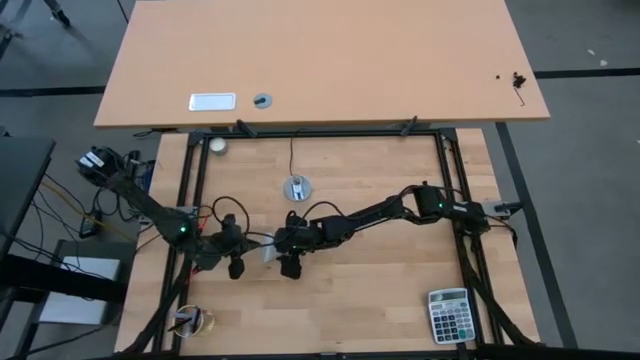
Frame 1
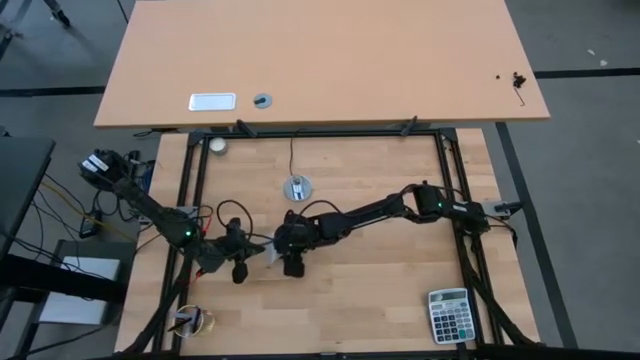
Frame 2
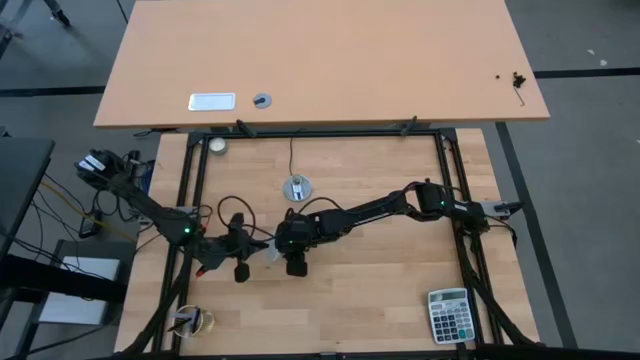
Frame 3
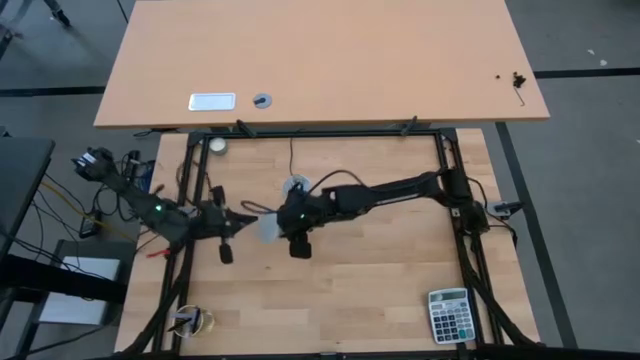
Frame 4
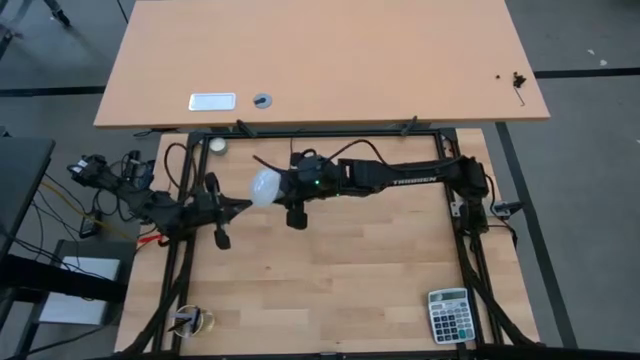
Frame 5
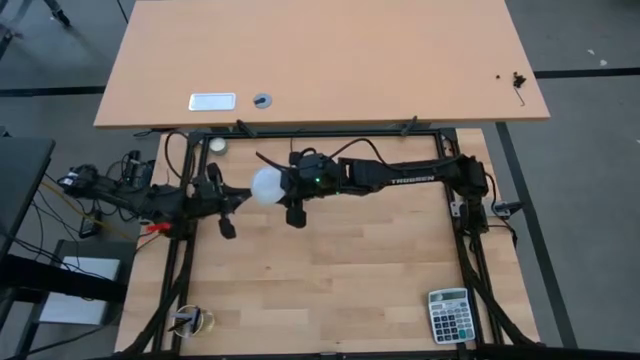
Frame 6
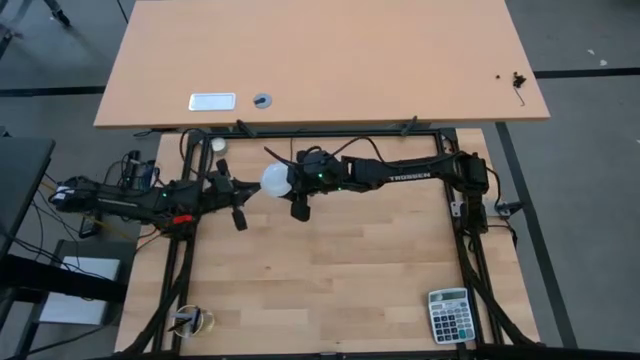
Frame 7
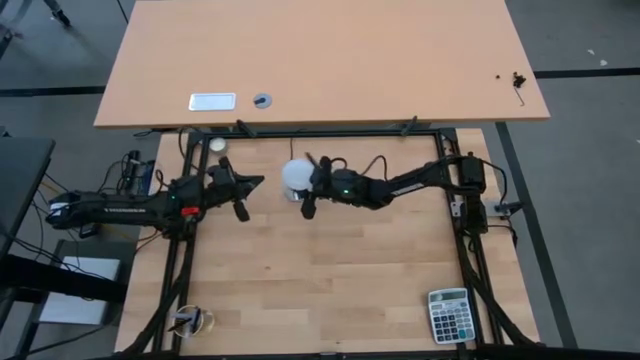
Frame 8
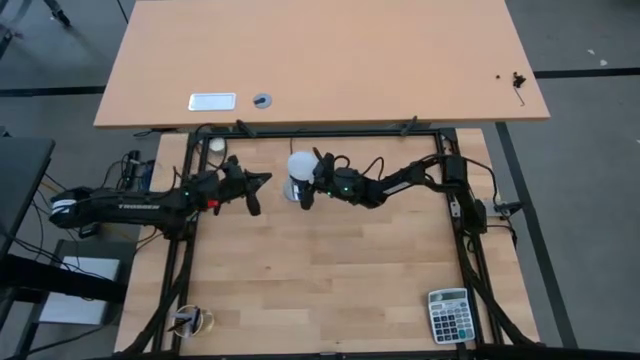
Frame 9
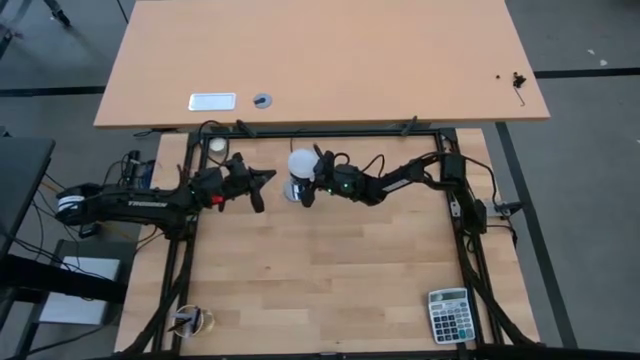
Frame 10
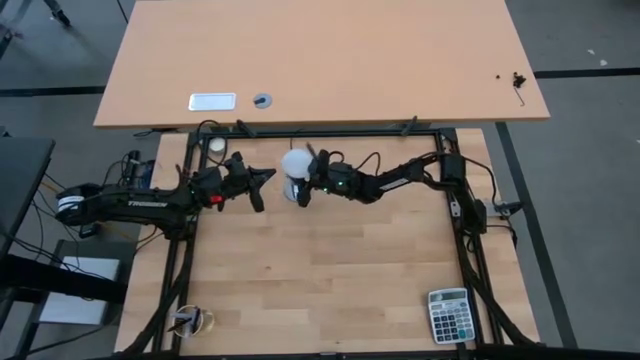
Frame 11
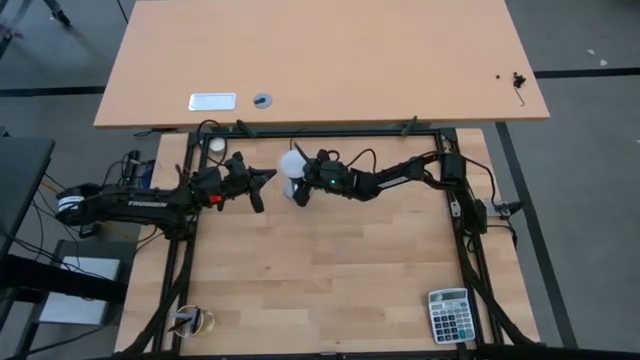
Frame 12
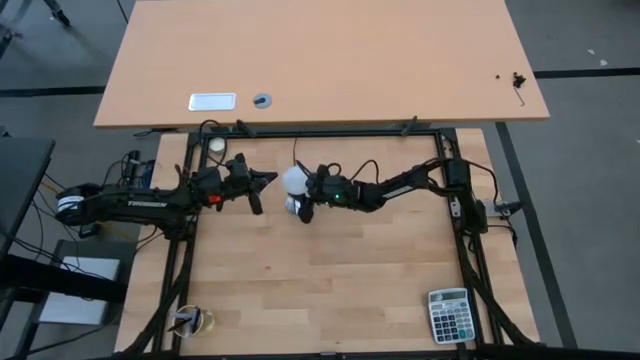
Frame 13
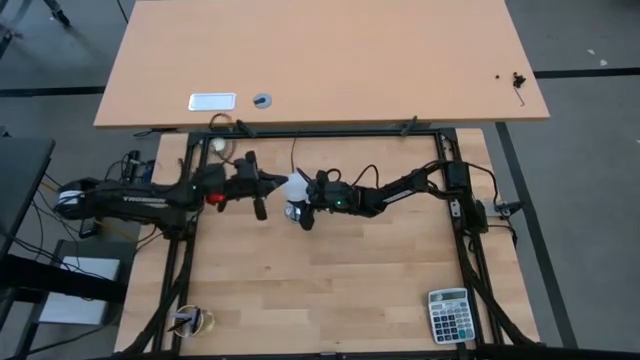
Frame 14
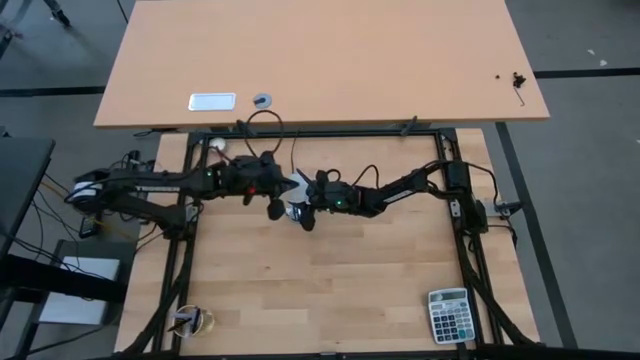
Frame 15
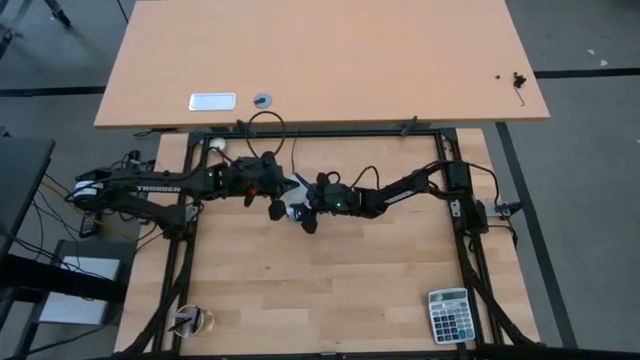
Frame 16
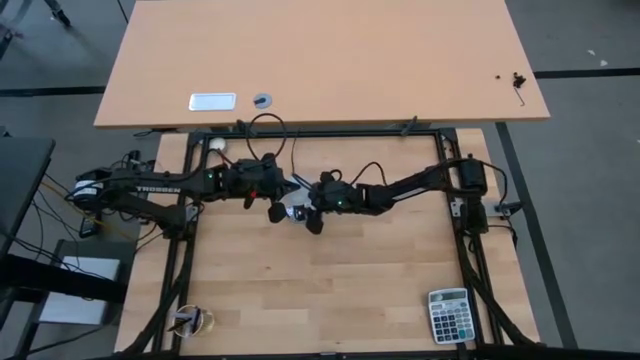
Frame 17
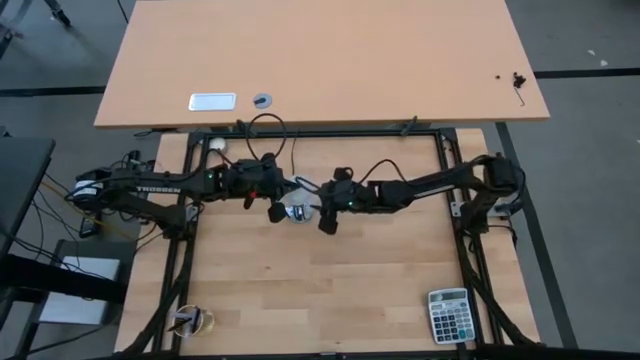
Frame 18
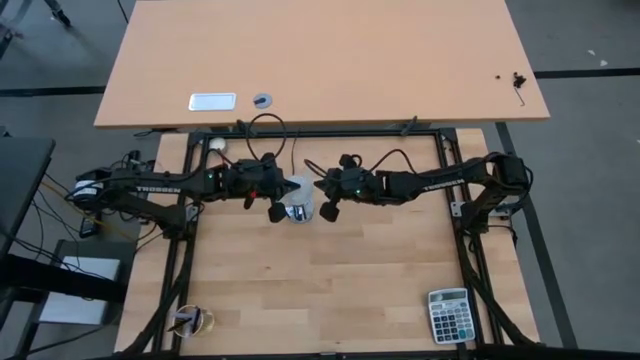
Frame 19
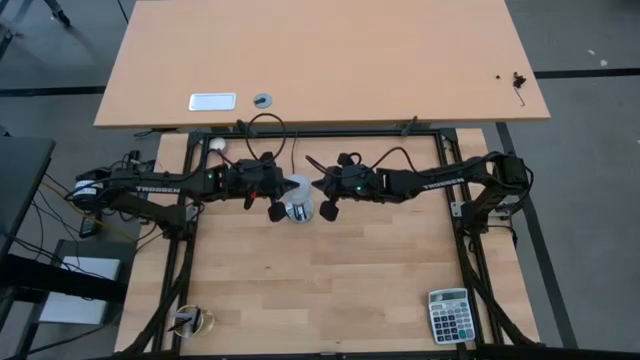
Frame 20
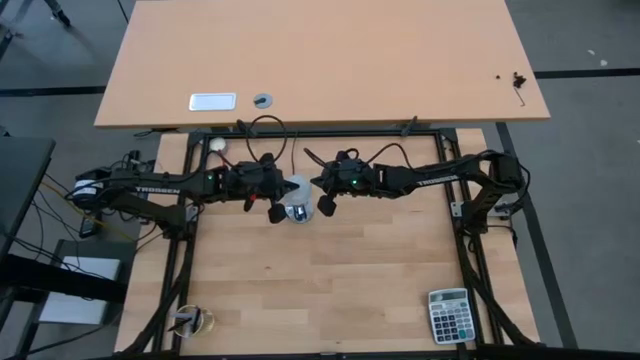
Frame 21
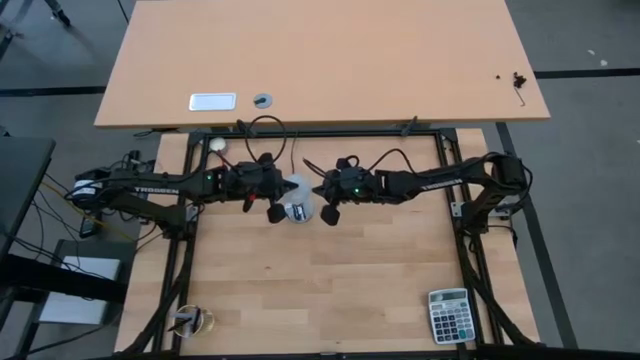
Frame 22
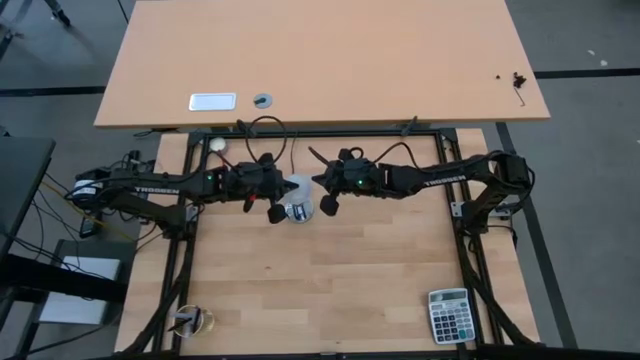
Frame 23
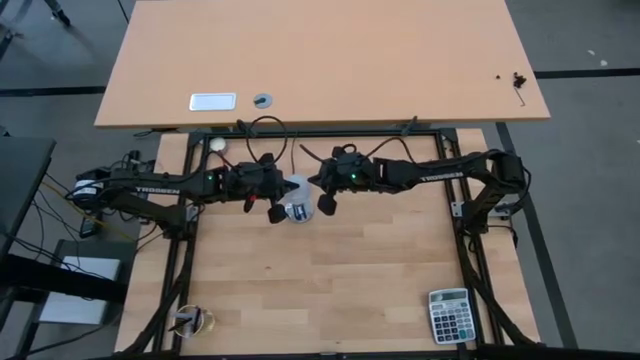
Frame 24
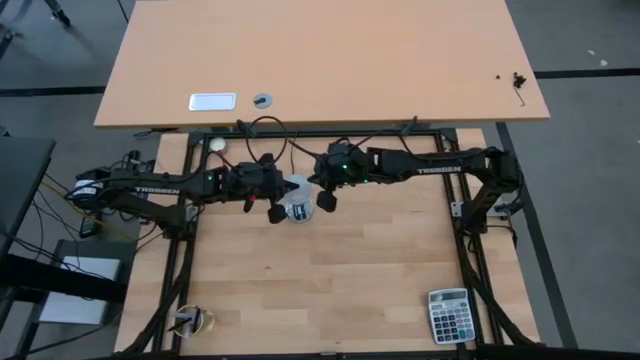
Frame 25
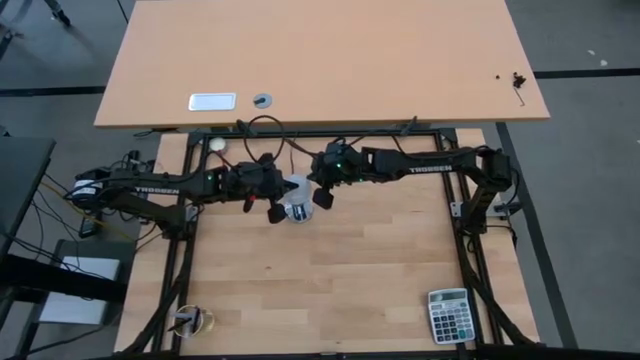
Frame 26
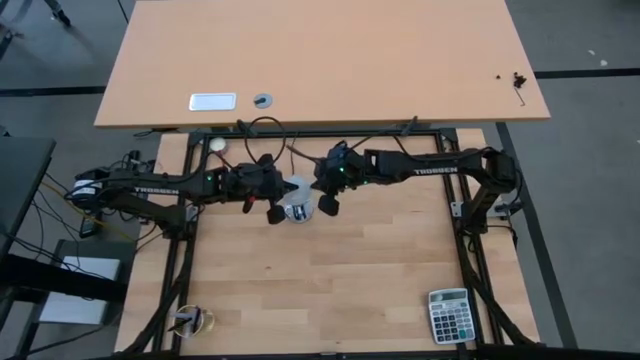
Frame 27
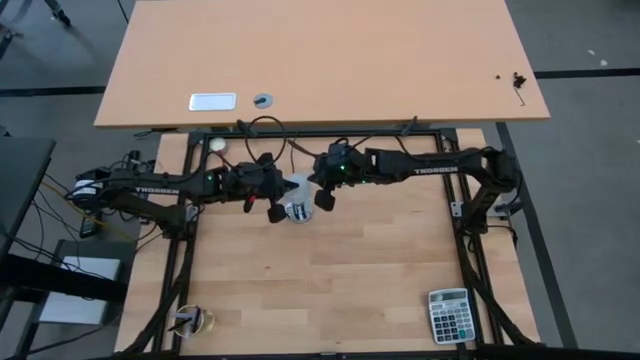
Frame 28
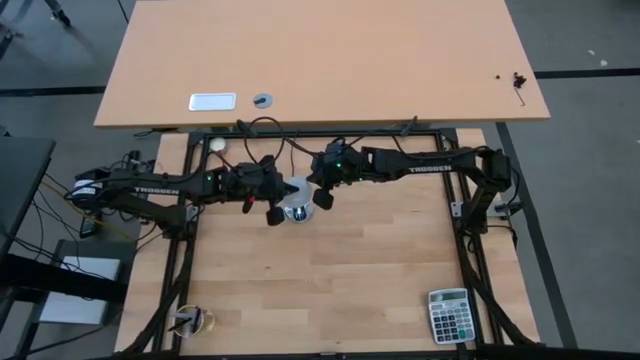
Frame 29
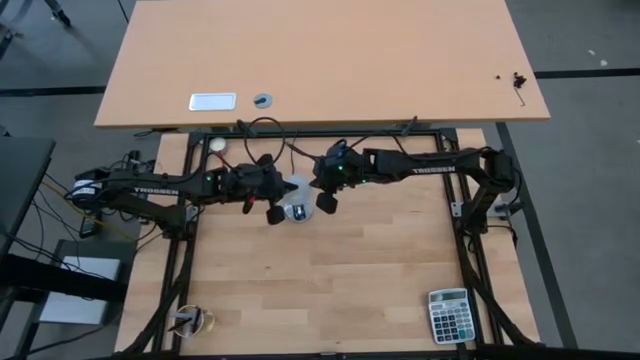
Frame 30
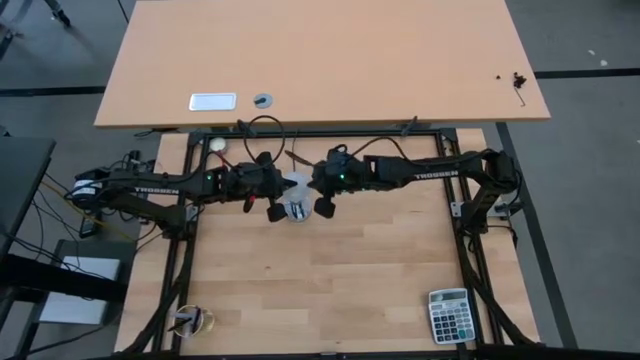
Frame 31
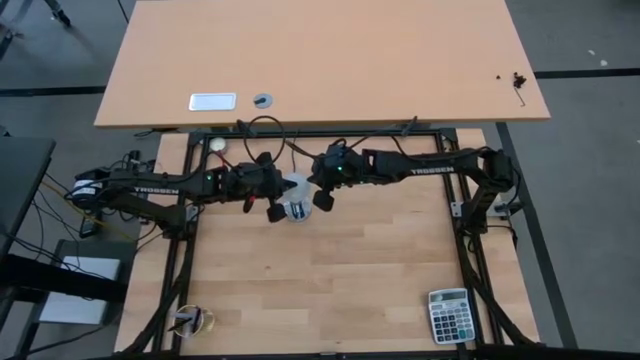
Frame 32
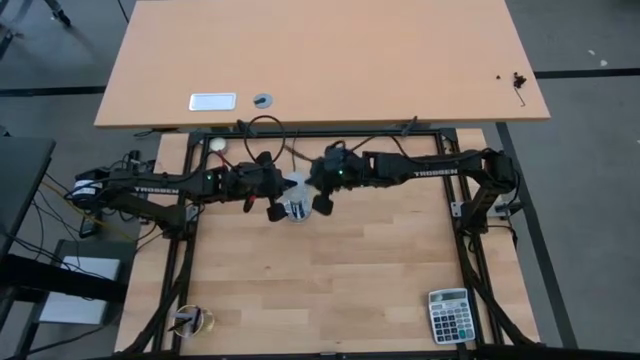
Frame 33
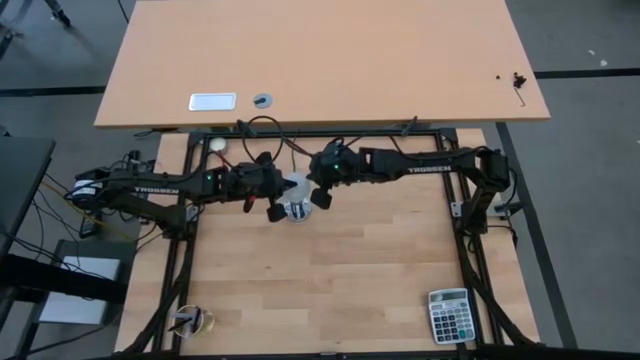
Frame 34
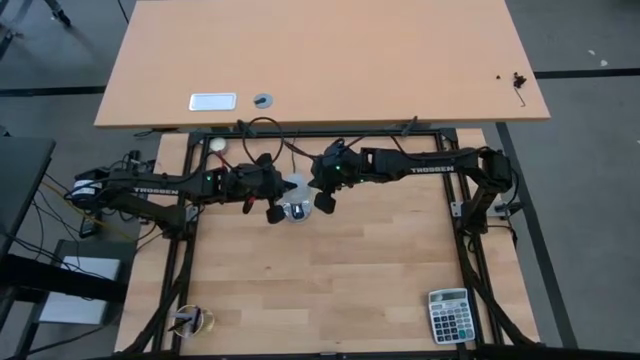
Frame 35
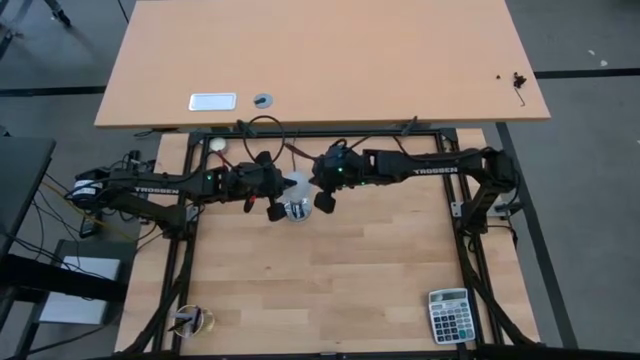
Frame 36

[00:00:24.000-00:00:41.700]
Task: Screw lightbulb
Insert the white light bulb into the silver lamp

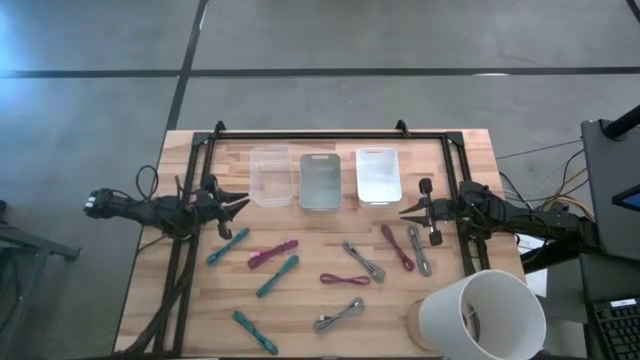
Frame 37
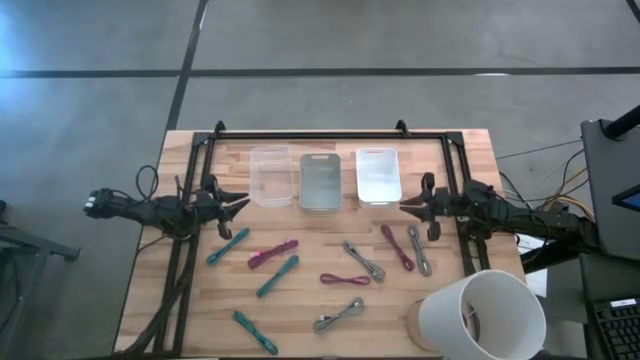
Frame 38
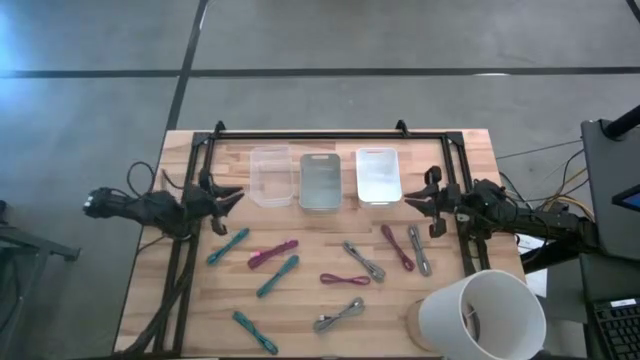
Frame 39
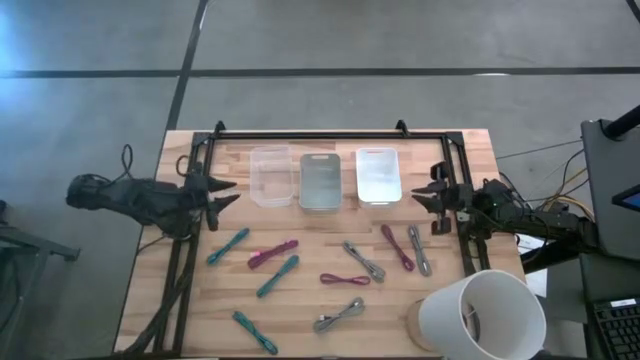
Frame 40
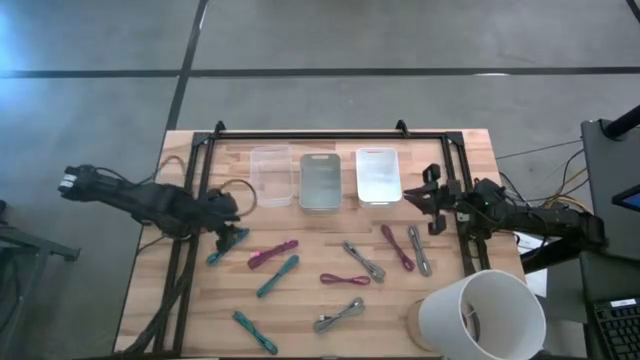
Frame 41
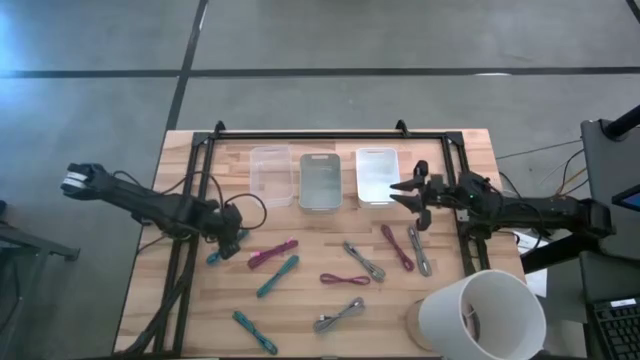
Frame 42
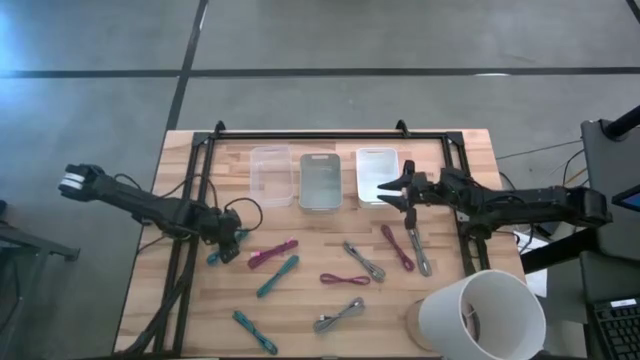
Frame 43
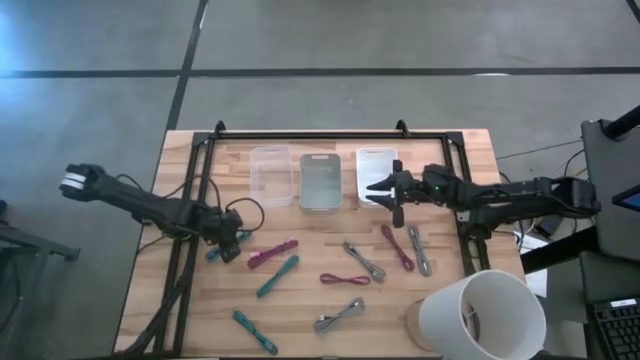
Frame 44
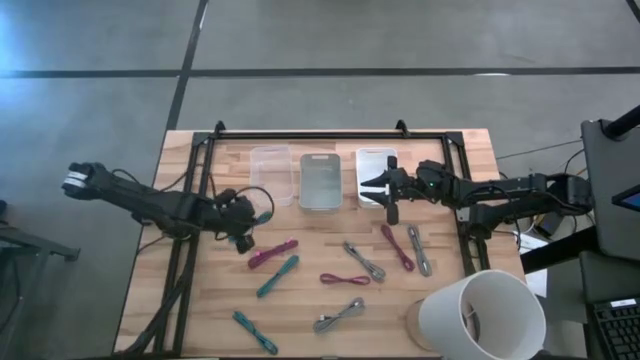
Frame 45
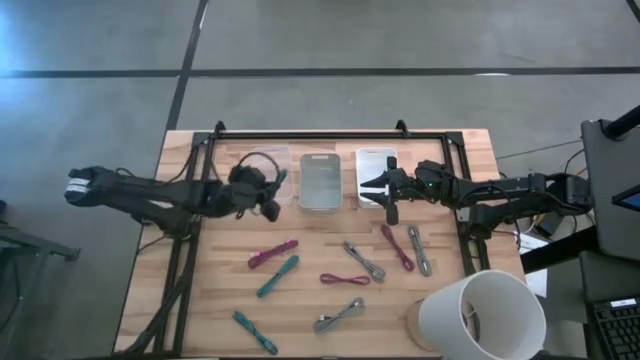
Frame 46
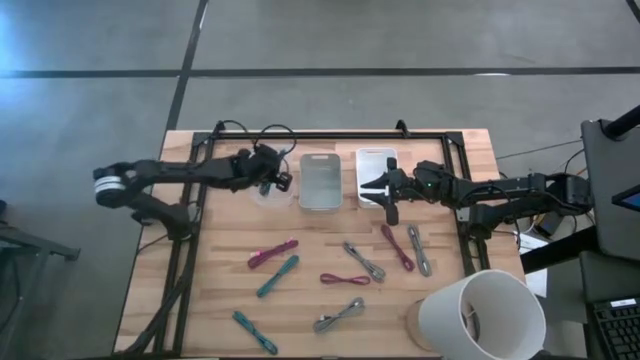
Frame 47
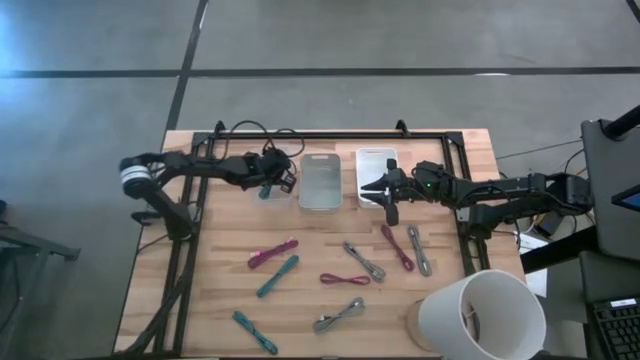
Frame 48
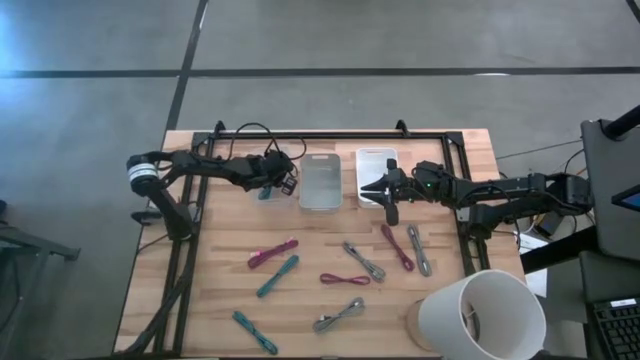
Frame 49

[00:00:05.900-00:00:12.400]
Task: Pick & Place USB Port
Put the top blue charger cable into the transparent bin
